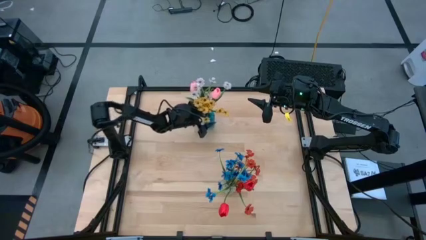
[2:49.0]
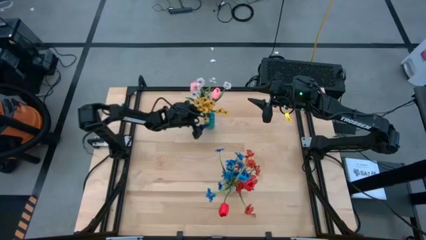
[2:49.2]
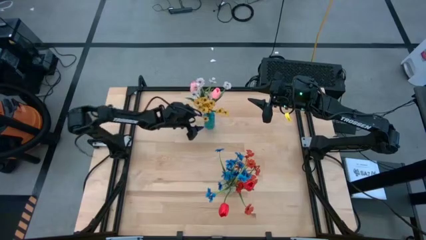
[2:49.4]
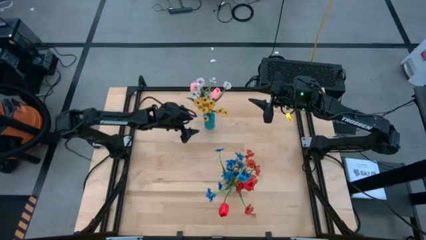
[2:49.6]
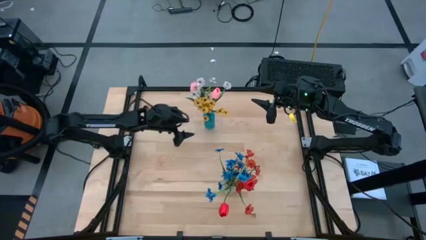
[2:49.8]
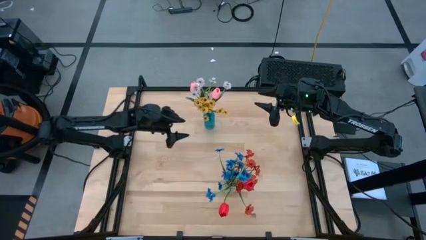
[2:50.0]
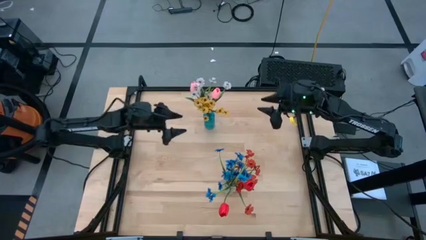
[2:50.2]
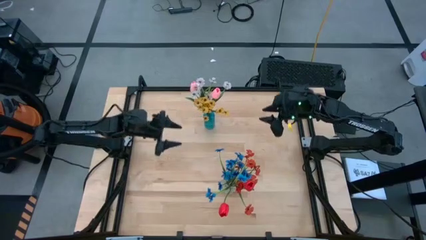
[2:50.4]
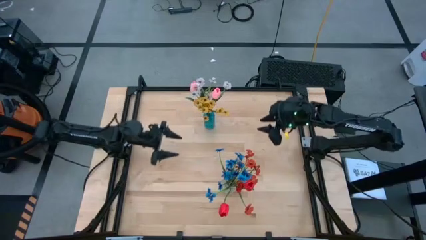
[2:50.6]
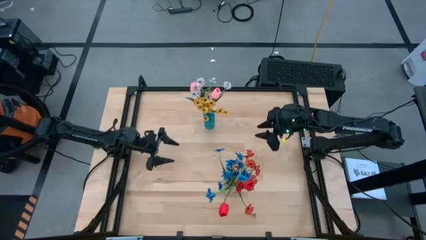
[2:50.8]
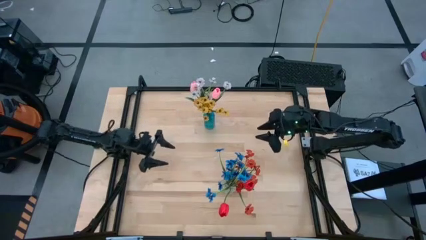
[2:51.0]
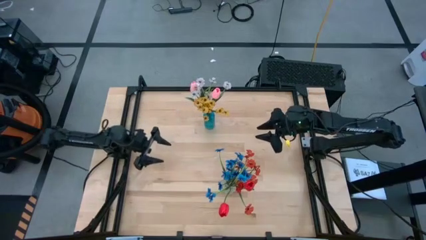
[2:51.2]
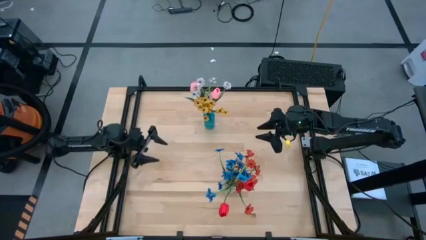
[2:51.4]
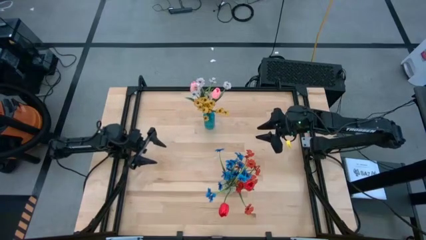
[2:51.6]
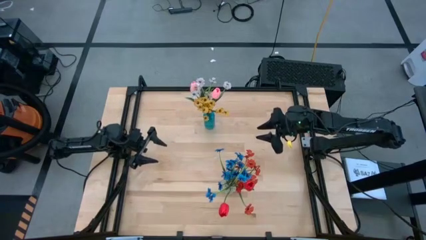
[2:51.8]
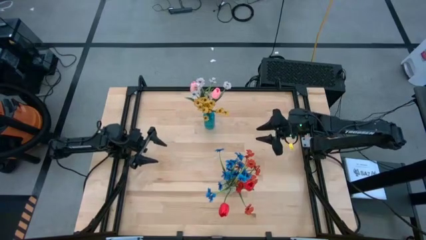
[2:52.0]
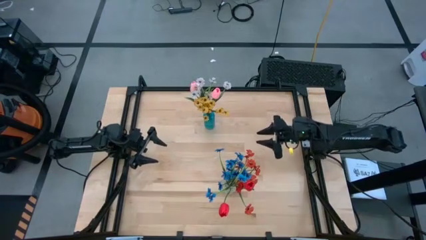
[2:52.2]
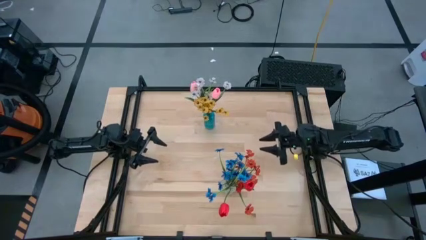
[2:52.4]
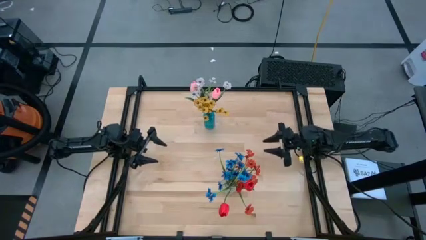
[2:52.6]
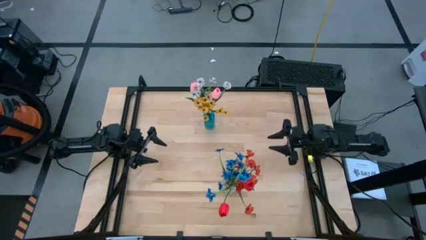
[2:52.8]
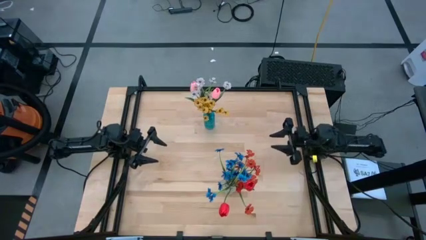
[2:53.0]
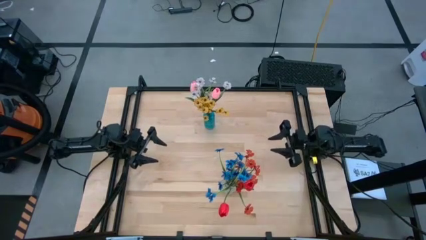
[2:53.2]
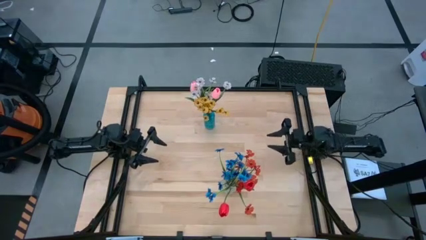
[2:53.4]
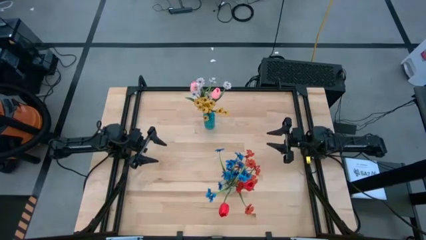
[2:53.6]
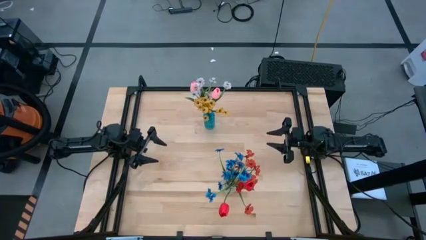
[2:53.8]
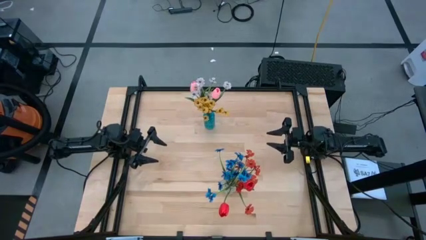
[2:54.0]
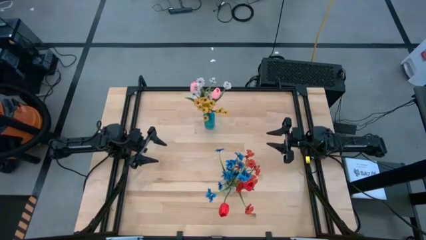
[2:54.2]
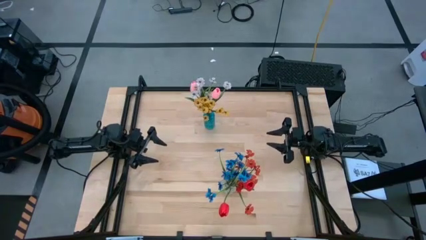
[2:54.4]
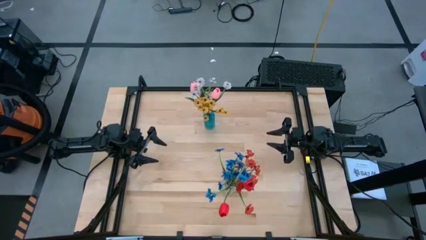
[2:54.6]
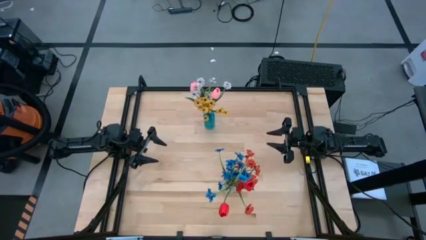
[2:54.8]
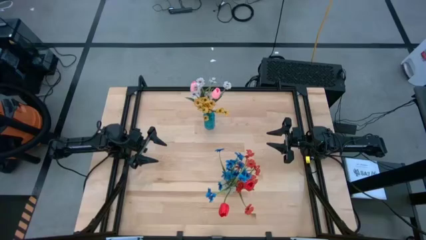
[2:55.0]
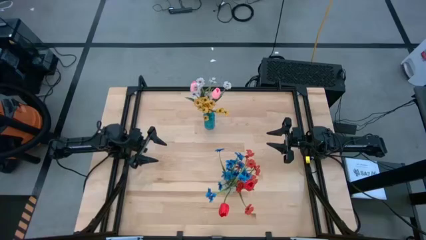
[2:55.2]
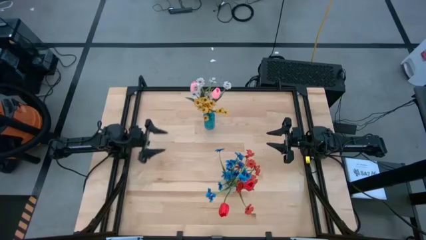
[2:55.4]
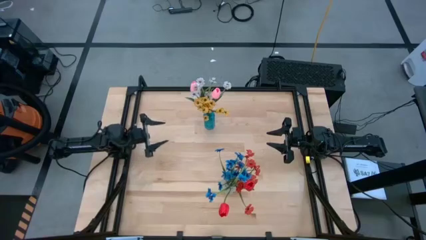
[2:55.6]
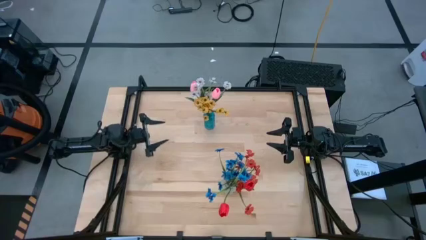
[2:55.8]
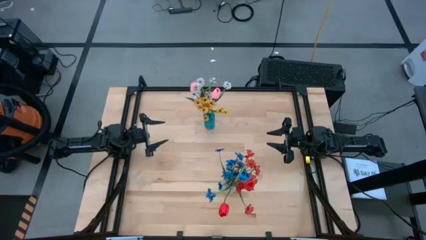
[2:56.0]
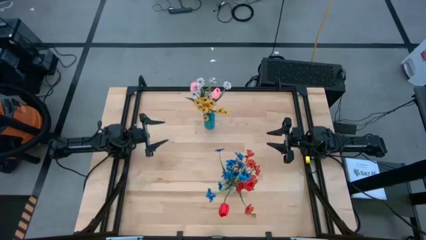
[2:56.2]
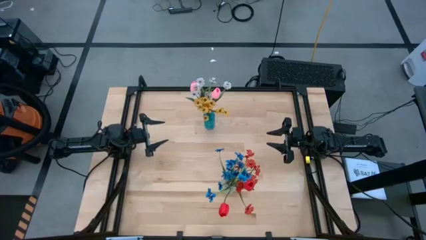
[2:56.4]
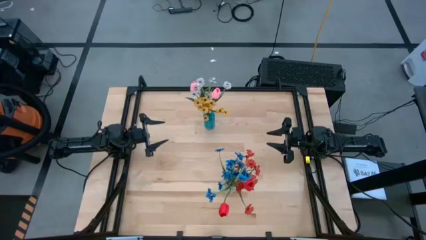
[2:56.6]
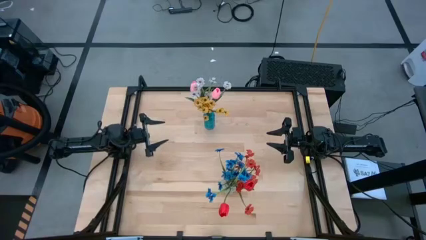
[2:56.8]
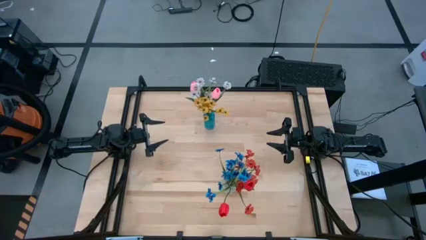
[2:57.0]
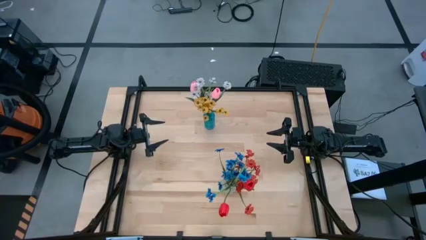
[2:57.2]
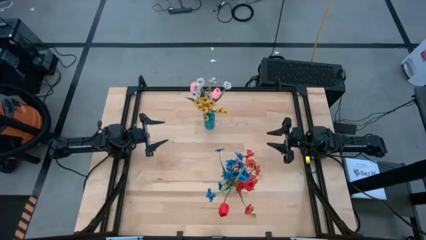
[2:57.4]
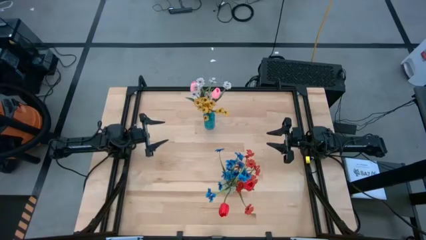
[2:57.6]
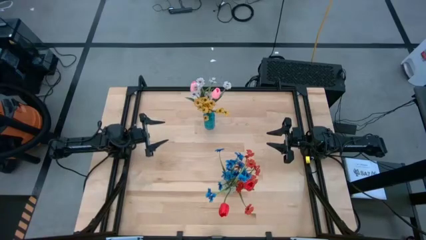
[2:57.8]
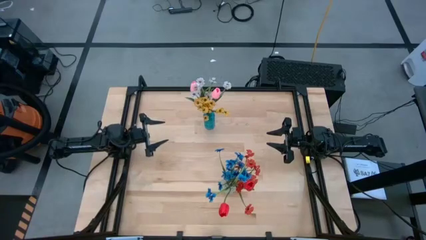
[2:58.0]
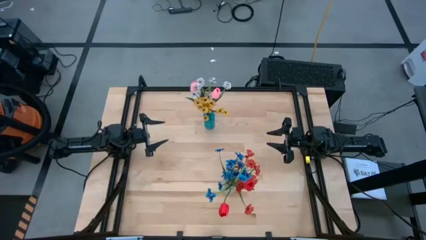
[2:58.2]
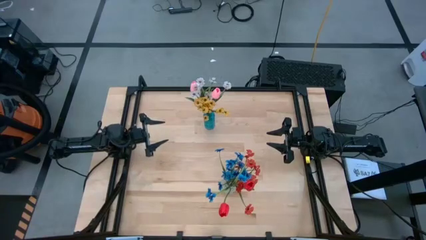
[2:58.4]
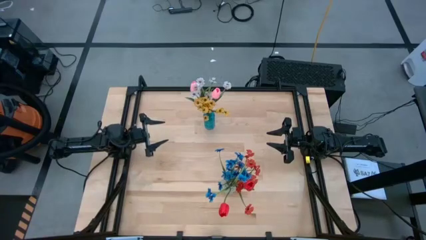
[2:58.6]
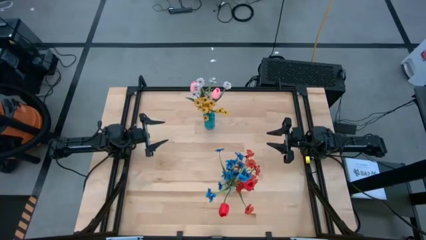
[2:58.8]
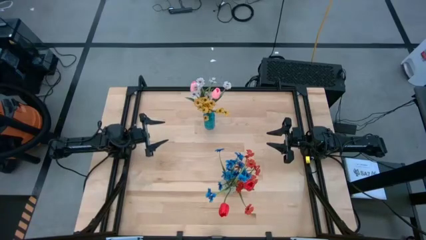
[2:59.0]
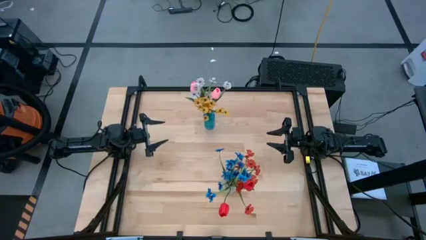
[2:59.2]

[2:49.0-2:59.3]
Task: Sort flowers into vase by color
Return to Home Position
